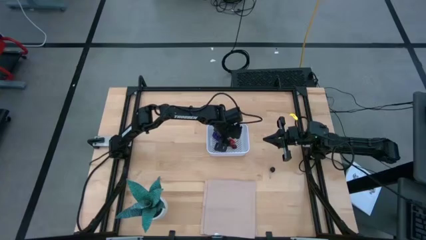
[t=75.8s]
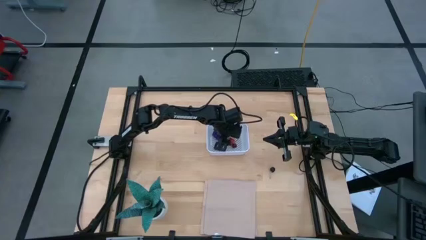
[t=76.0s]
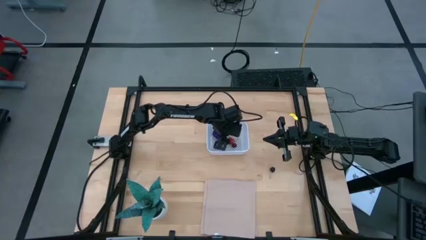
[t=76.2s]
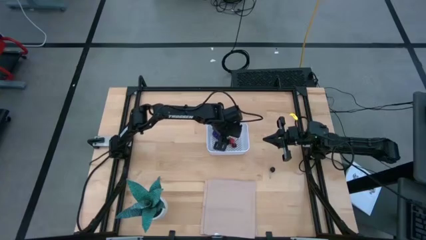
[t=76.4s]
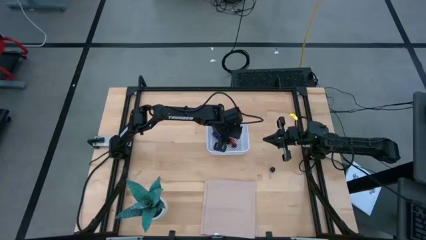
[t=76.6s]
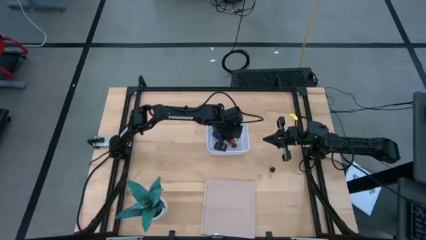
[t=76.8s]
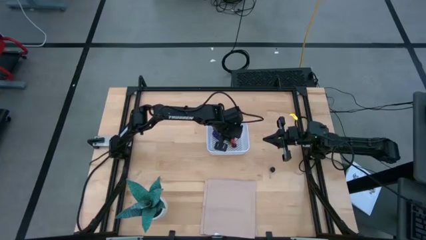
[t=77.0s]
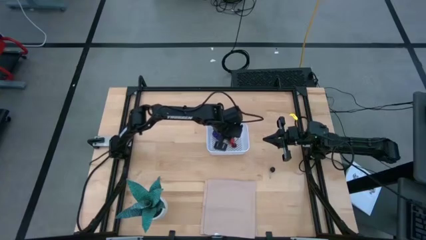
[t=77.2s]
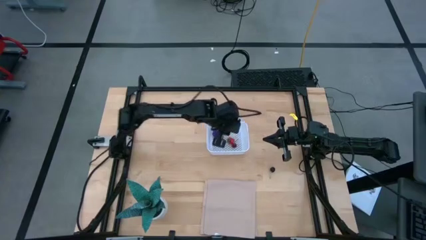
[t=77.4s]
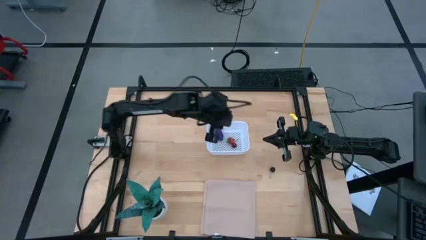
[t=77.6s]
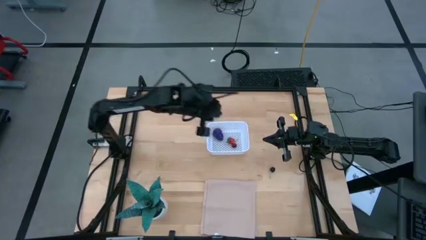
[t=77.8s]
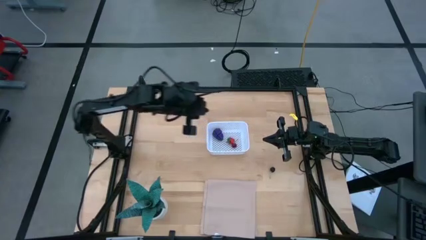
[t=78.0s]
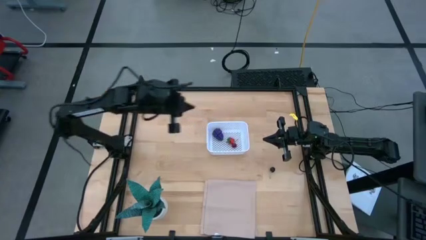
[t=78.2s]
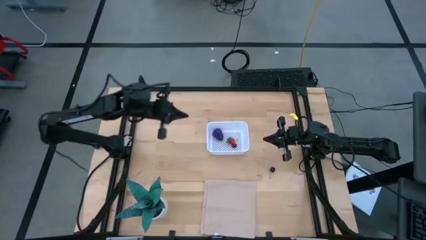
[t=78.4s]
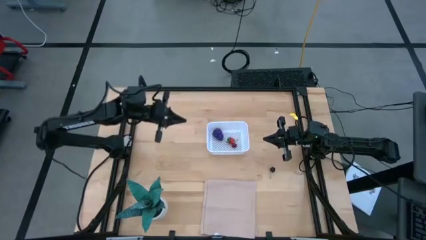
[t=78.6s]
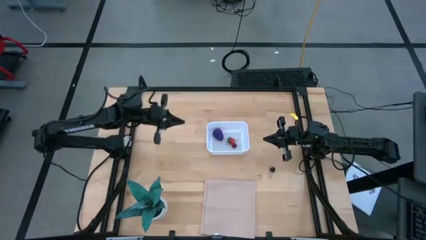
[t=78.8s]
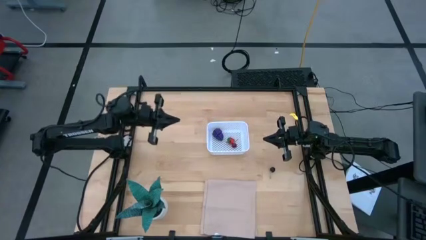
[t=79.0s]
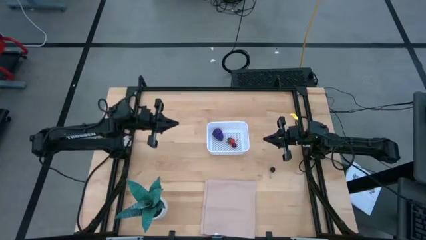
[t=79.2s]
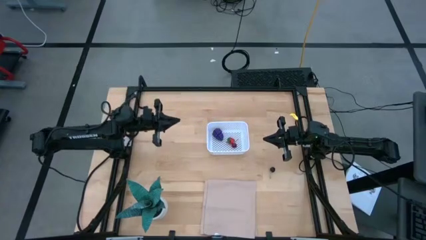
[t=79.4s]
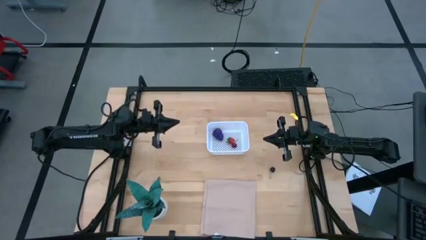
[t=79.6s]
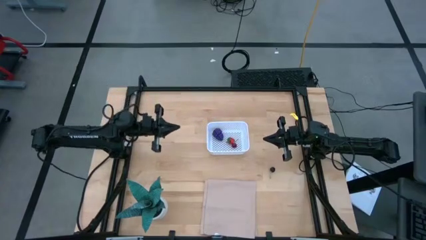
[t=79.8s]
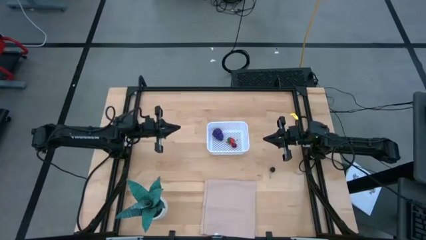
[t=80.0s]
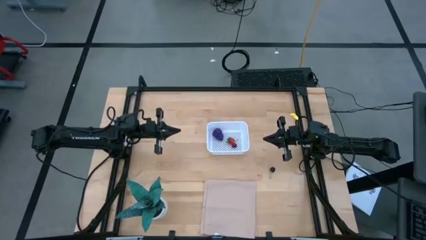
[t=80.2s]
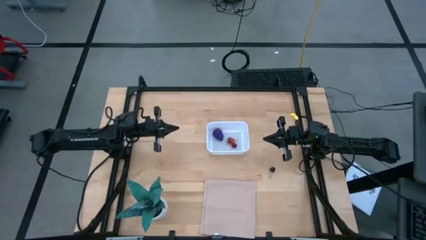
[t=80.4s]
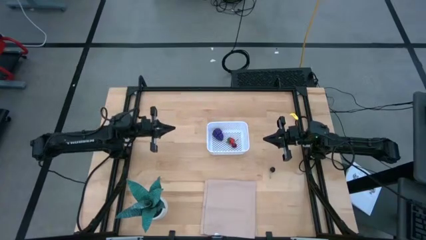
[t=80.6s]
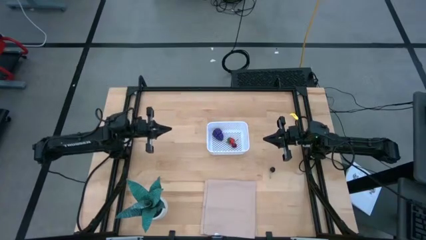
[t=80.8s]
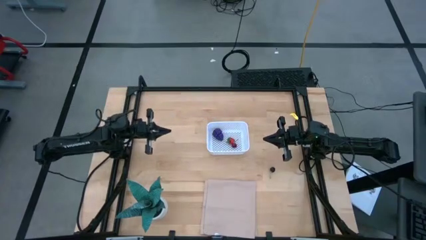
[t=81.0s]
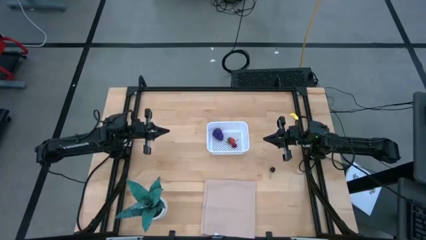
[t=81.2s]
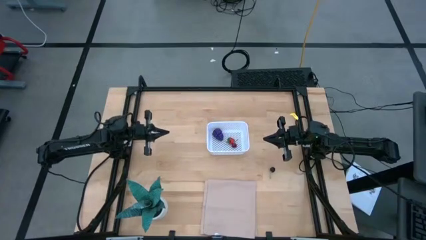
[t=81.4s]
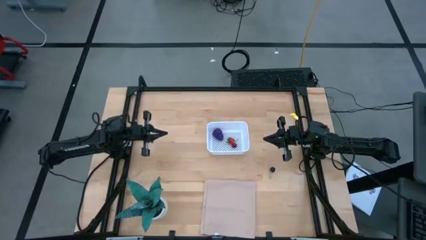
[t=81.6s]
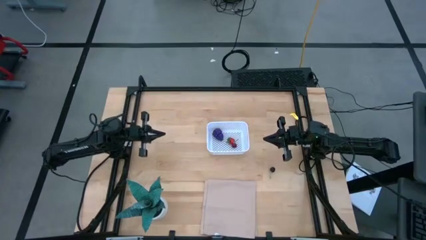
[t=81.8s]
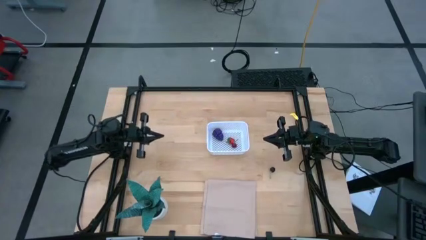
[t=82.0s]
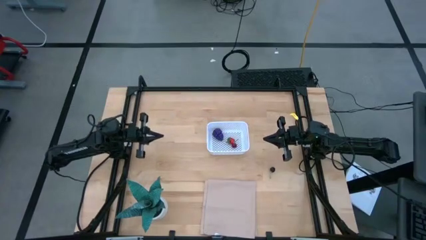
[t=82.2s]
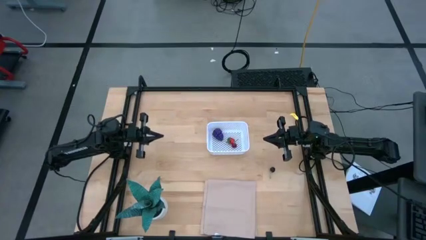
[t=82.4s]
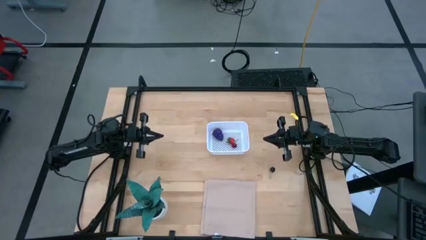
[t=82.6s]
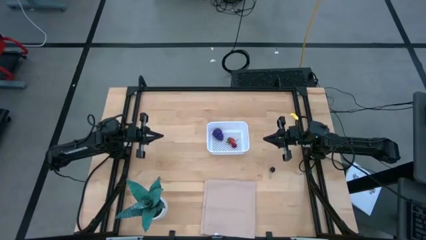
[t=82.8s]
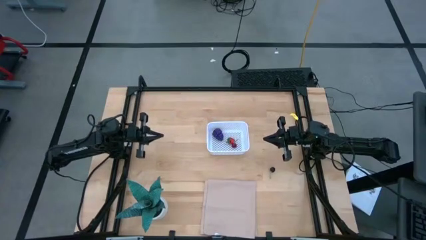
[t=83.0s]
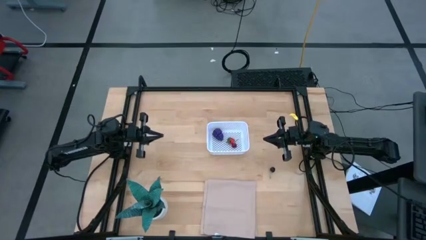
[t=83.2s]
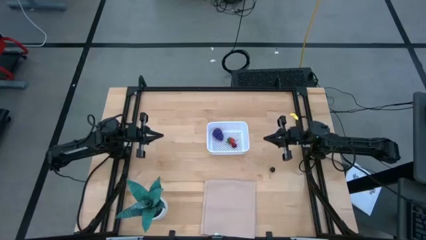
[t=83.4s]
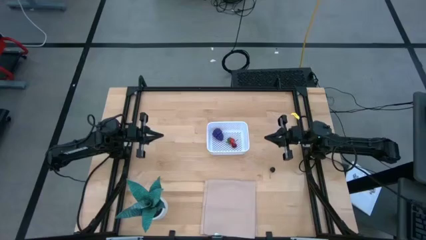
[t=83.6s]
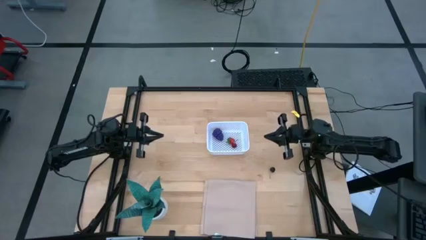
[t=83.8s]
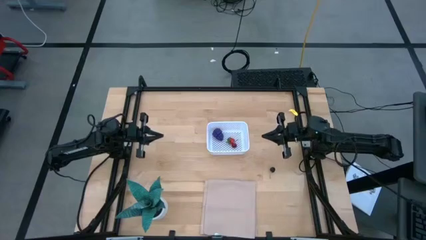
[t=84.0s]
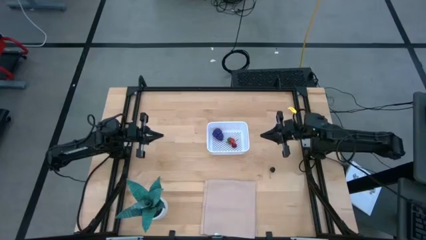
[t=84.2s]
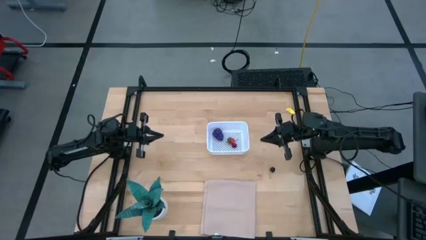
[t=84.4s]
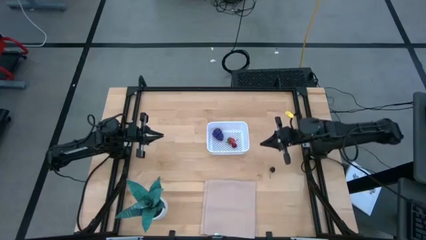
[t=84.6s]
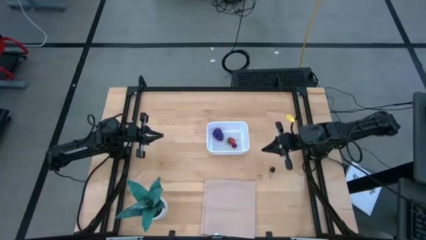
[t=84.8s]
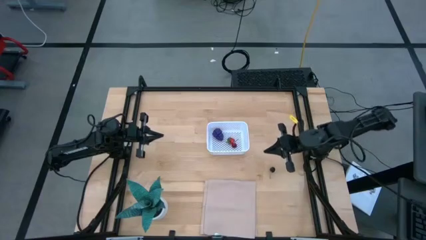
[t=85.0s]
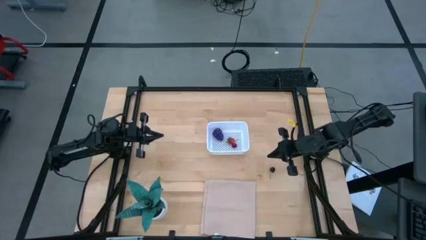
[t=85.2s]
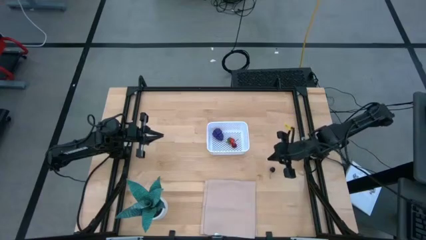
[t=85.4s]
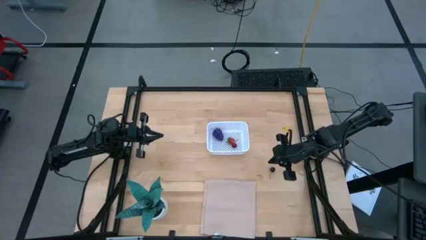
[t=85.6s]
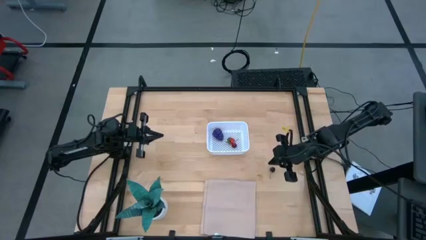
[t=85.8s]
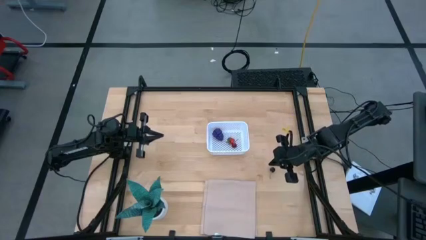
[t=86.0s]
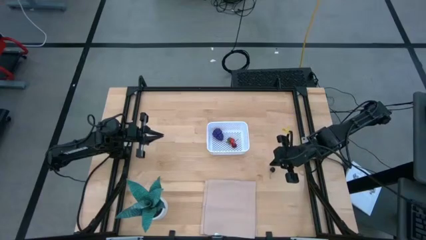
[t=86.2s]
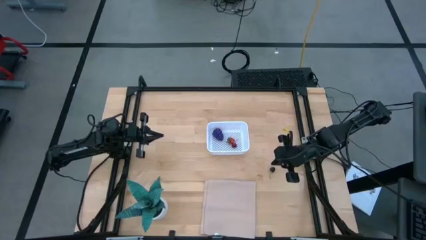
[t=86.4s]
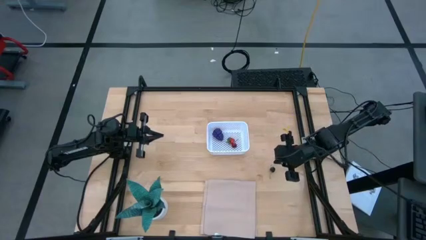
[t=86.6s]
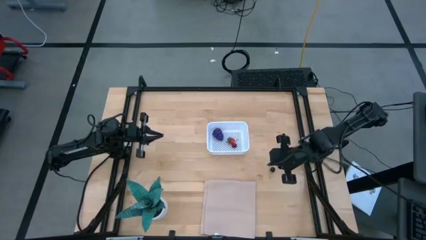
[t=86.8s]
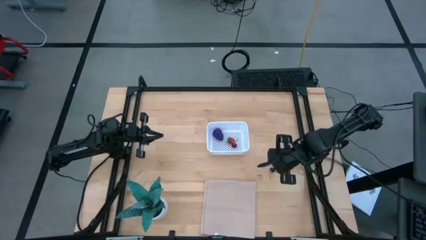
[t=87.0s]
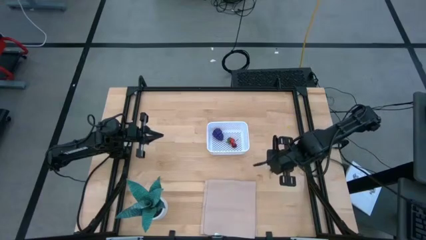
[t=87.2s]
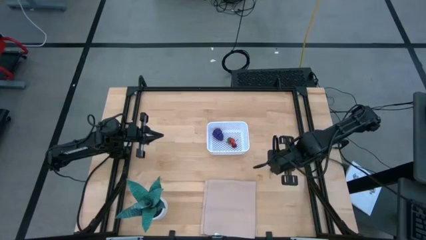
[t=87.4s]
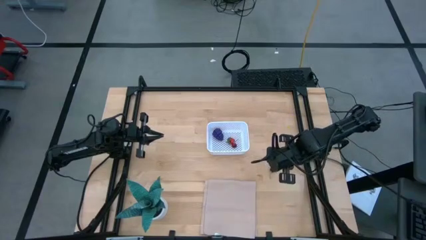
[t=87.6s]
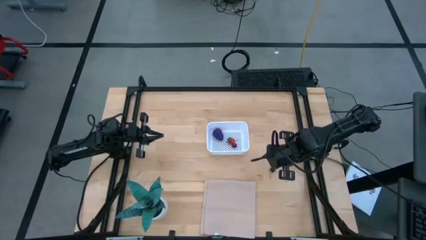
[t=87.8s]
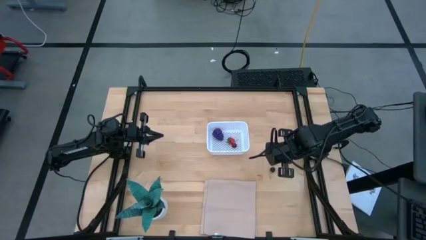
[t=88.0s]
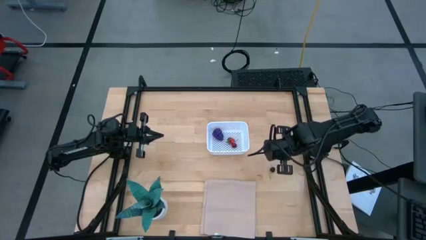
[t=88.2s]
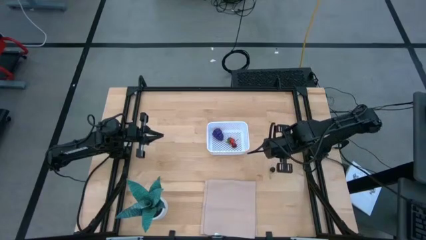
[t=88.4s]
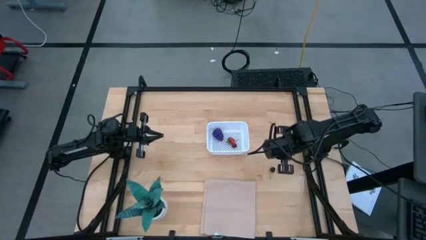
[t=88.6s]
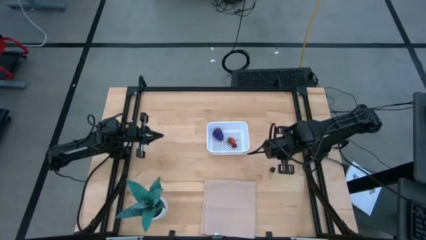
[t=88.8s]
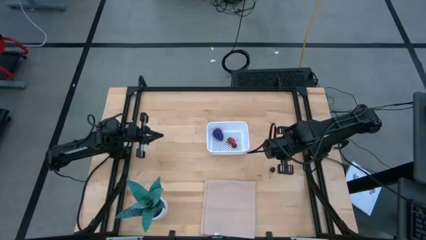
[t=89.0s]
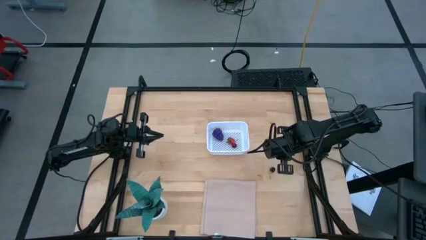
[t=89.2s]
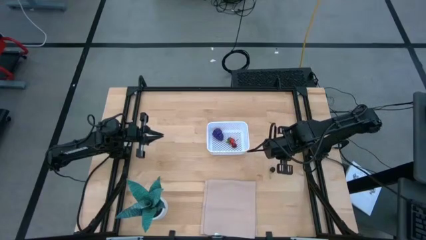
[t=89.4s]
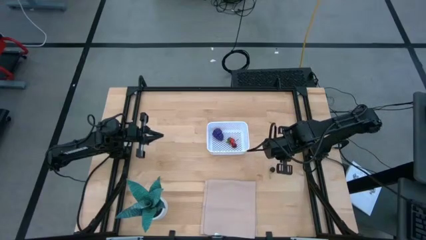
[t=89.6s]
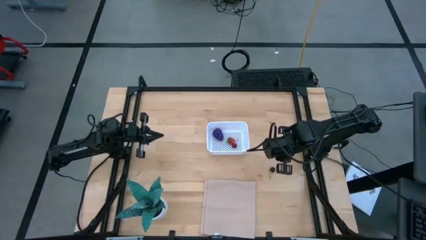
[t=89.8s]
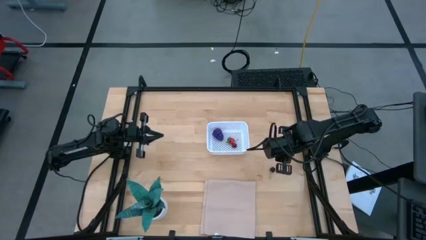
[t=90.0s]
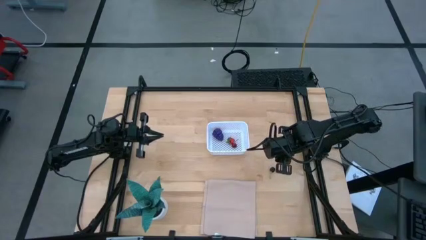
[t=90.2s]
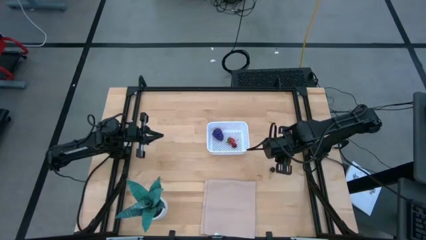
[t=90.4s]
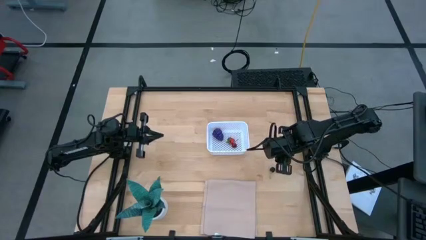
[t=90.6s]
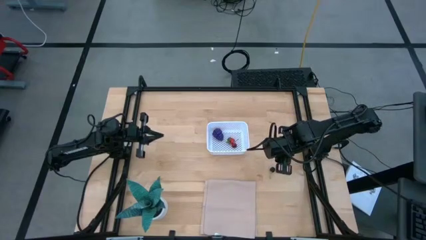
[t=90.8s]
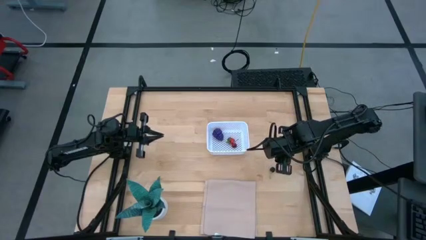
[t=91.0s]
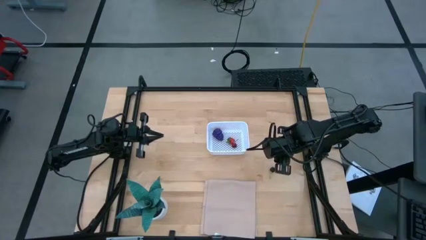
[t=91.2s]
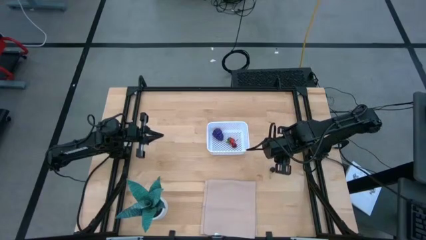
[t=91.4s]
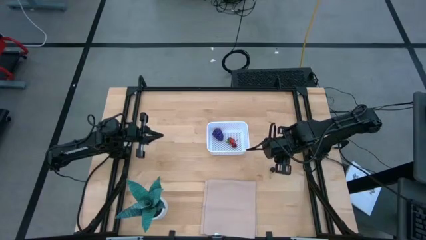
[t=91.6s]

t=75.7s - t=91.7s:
Task: Pick and placing Produce into tupperware
Put the black cherry into the white bin
